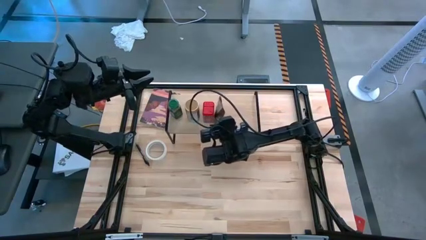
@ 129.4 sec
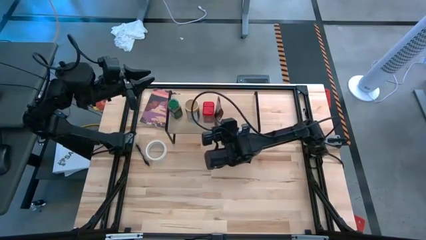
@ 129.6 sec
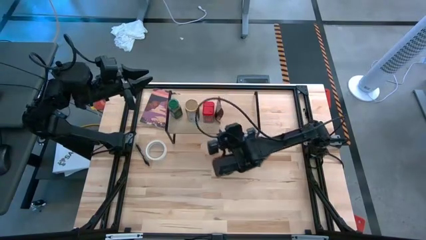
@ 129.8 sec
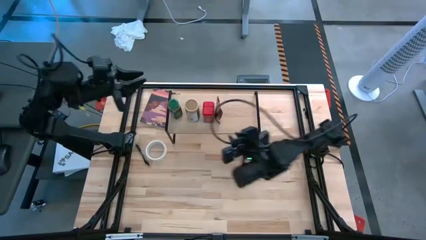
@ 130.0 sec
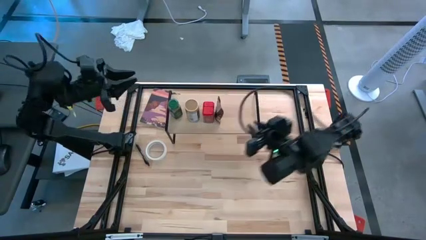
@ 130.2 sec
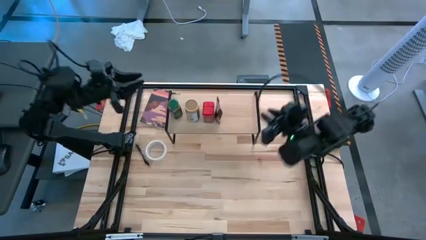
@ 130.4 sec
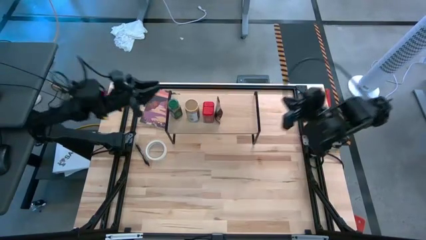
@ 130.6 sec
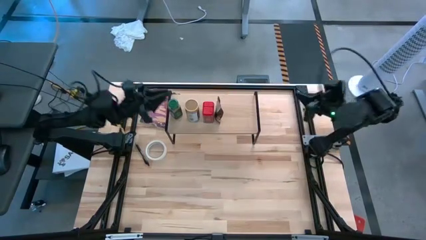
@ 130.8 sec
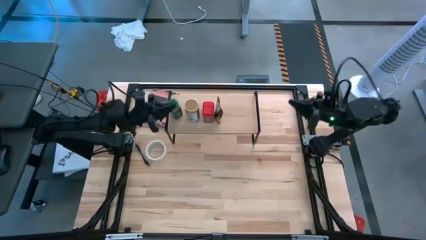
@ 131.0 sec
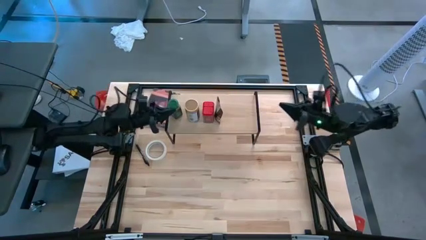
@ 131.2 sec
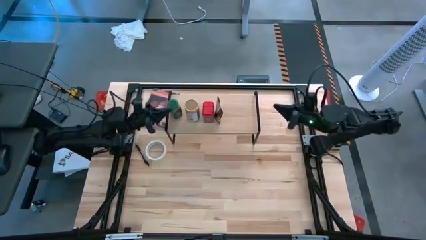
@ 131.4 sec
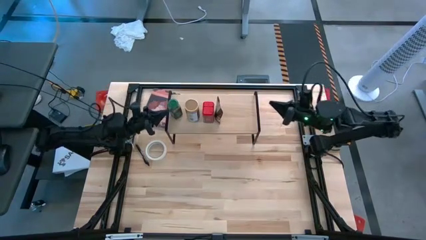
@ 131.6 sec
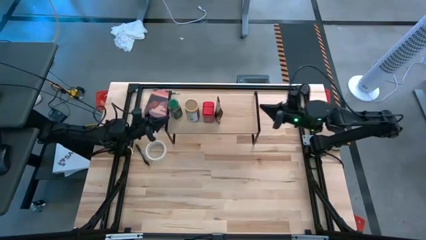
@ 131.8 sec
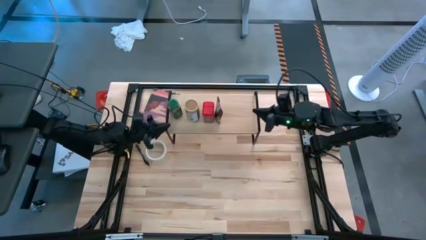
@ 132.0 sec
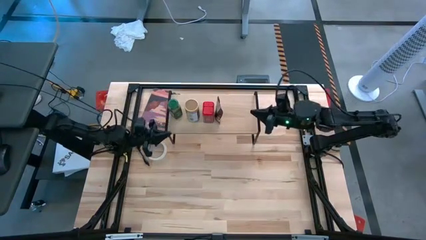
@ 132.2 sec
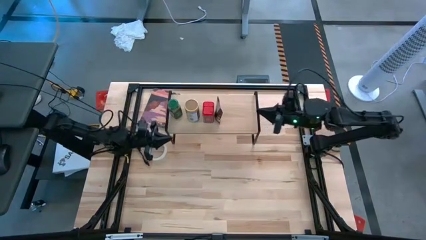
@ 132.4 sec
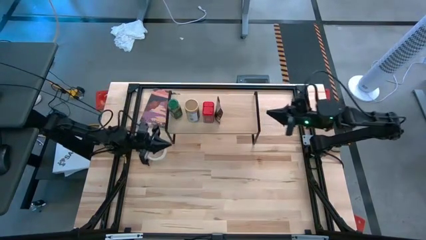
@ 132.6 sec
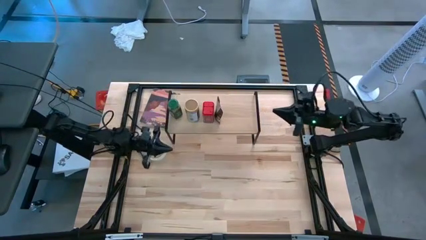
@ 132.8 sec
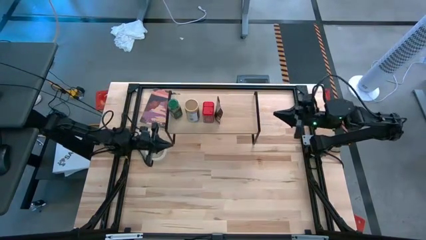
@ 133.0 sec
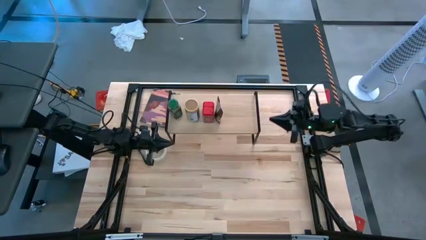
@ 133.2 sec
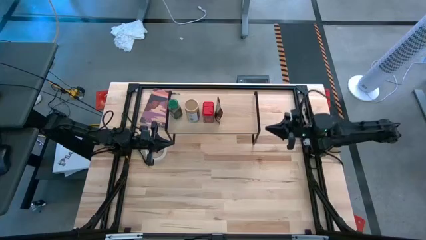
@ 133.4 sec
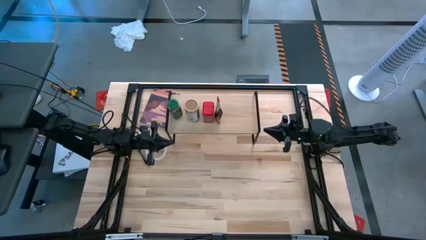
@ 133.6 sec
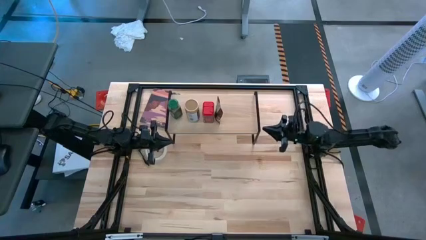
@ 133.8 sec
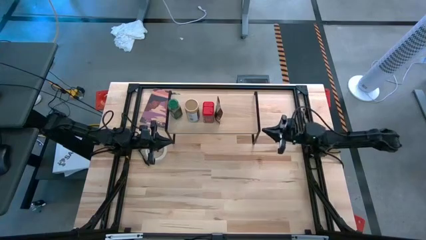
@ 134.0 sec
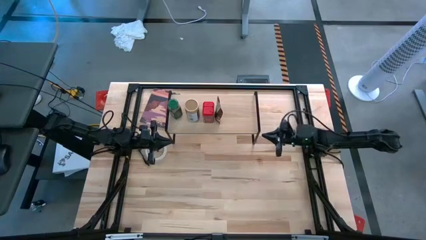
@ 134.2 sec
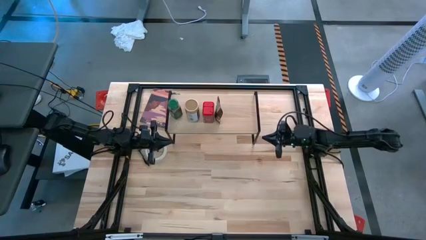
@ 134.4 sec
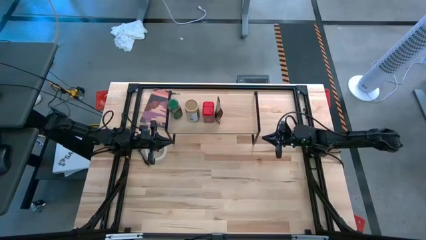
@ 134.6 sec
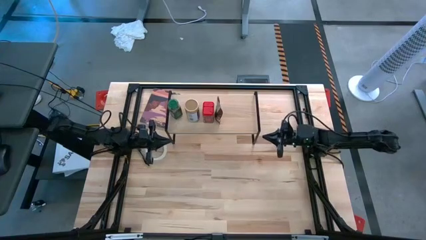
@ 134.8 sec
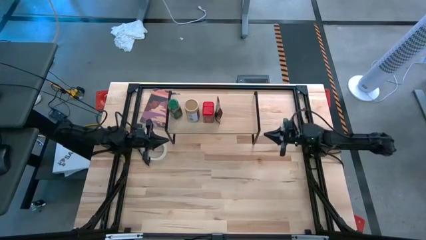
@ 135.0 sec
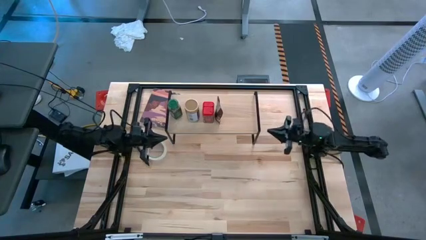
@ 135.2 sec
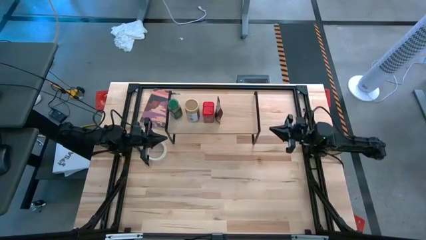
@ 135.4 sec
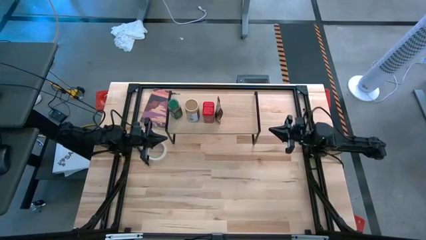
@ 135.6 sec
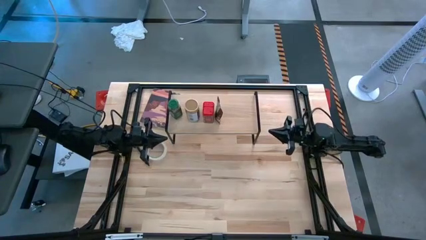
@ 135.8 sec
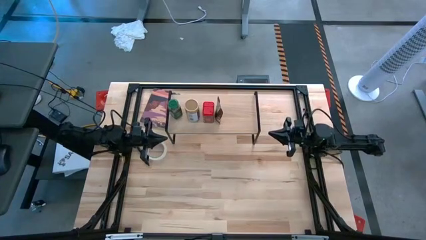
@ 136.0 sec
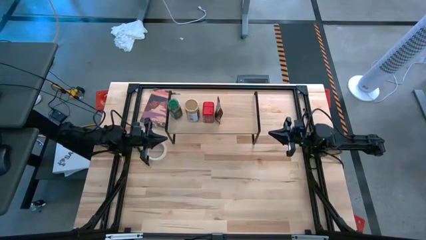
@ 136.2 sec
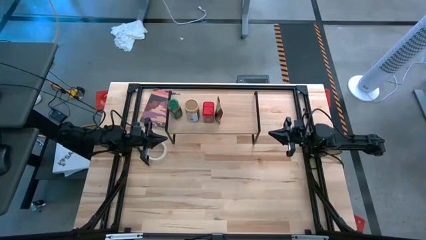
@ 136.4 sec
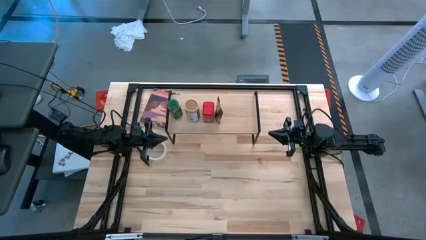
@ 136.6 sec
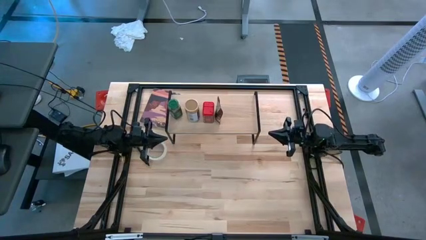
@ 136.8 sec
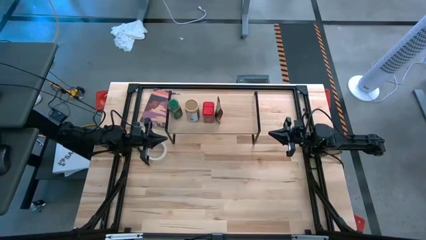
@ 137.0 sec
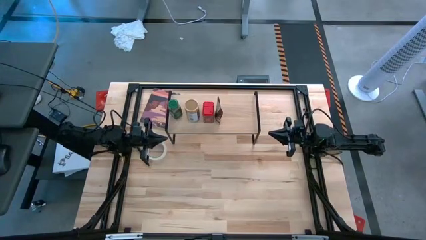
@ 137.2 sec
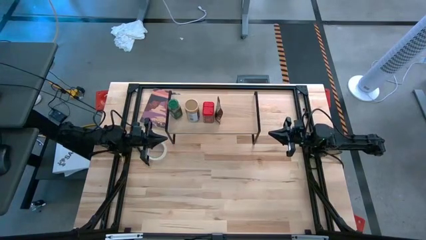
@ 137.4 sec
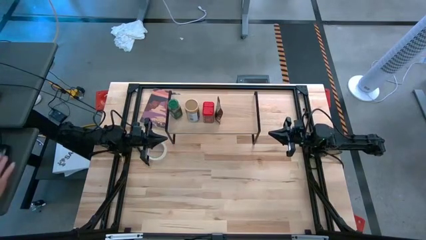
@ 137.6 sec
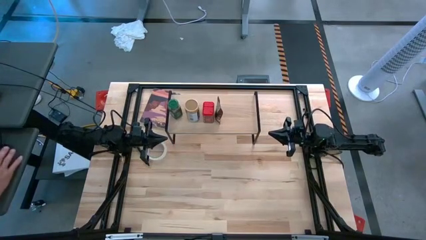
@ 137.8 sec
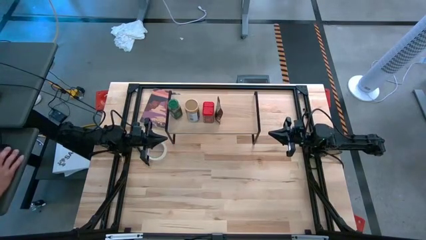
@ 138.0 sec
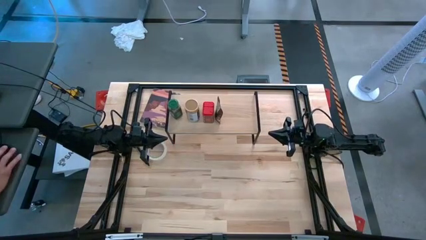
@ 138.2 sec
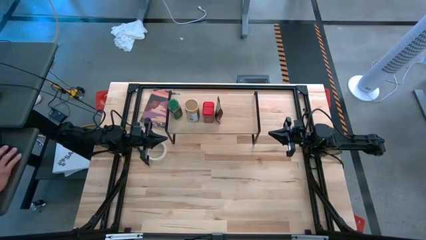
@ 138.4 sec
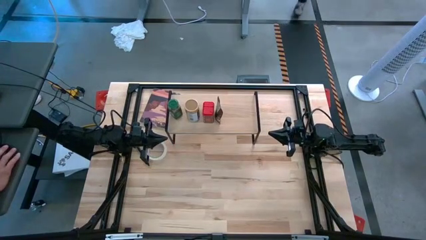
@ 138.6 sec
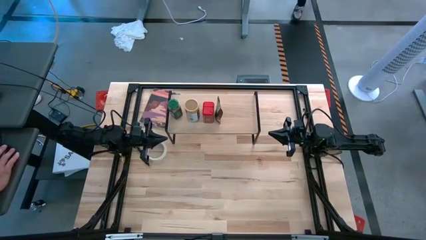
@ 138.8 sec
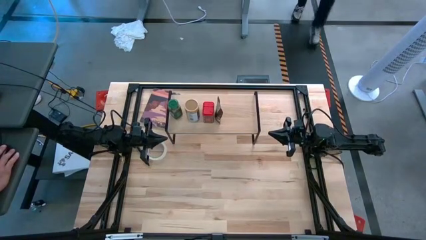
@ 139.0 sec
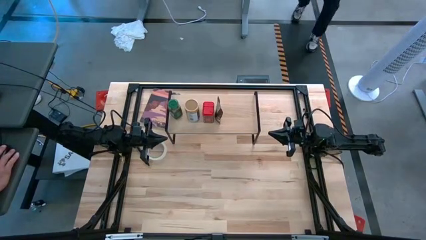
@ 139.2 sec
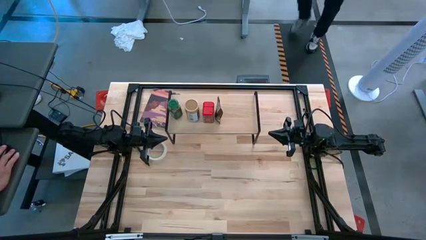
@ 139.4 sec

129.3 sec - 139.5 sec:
Task: Shelf spices
Return to Home Position

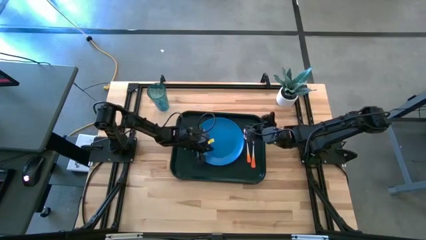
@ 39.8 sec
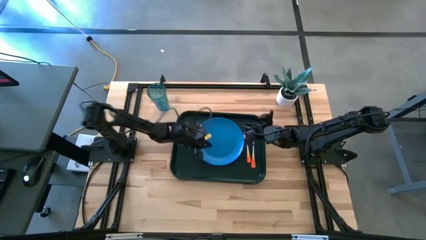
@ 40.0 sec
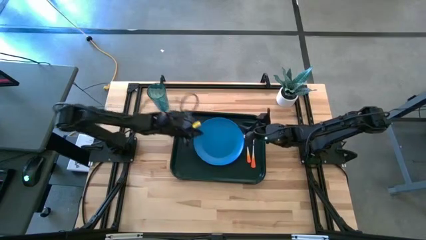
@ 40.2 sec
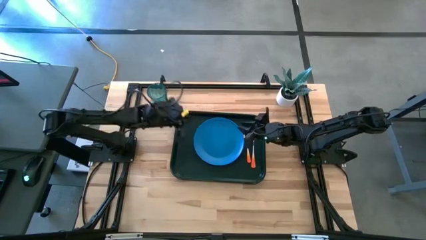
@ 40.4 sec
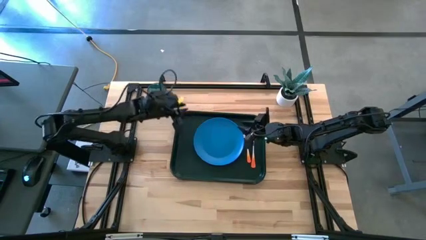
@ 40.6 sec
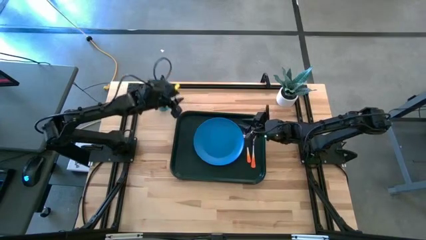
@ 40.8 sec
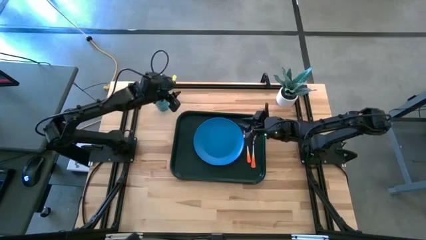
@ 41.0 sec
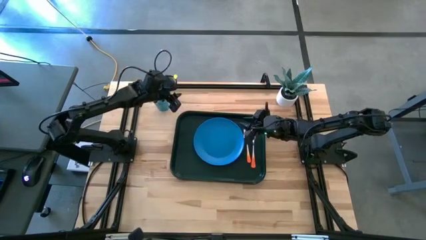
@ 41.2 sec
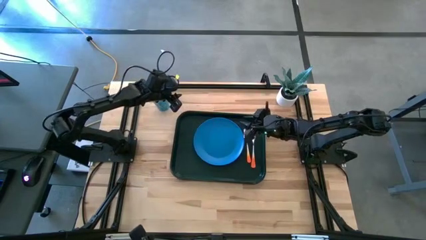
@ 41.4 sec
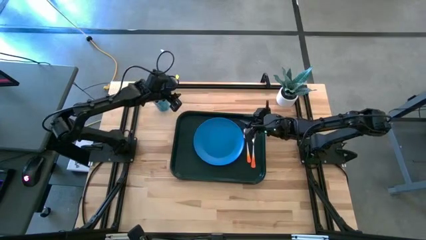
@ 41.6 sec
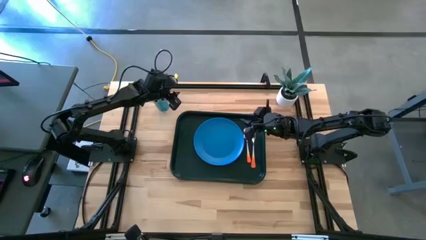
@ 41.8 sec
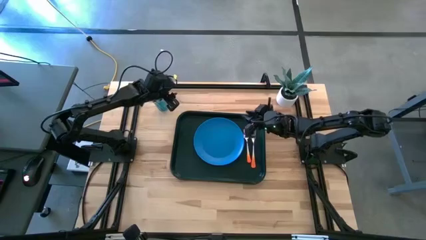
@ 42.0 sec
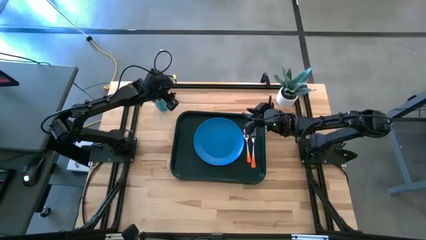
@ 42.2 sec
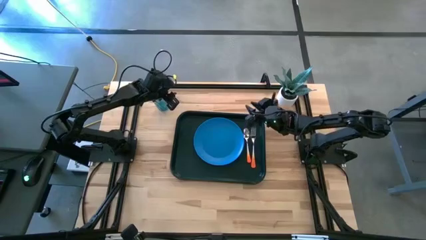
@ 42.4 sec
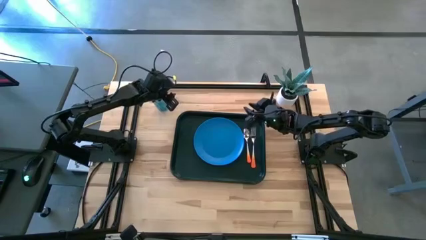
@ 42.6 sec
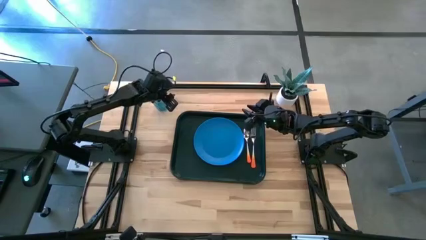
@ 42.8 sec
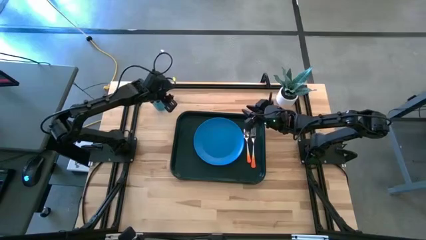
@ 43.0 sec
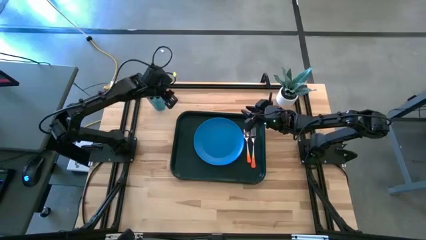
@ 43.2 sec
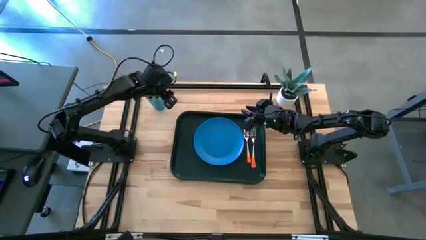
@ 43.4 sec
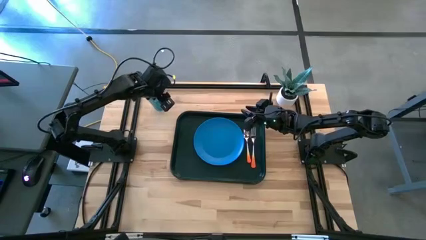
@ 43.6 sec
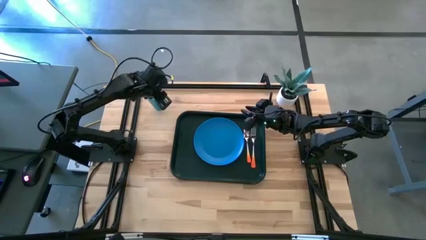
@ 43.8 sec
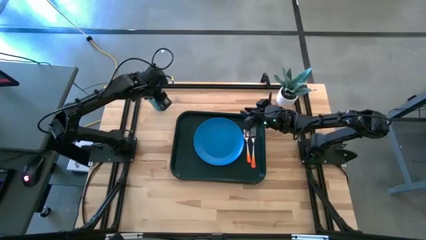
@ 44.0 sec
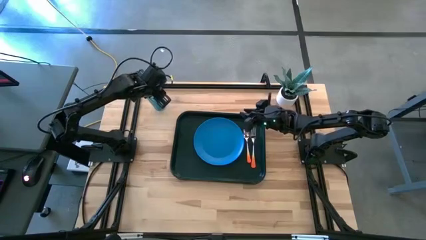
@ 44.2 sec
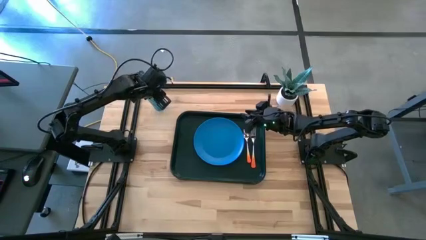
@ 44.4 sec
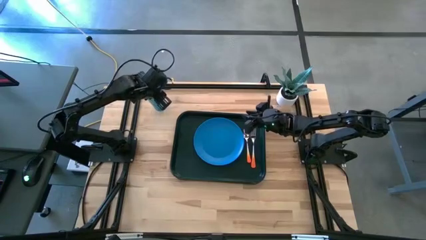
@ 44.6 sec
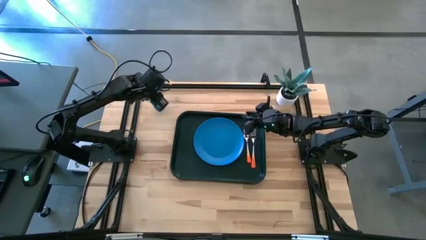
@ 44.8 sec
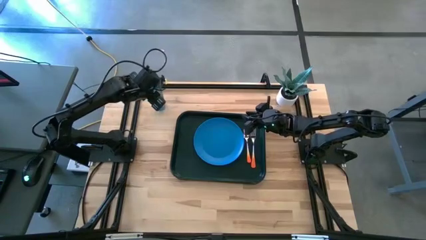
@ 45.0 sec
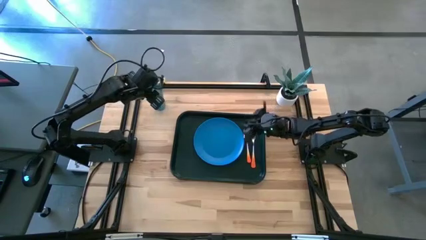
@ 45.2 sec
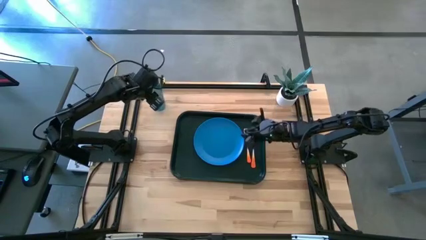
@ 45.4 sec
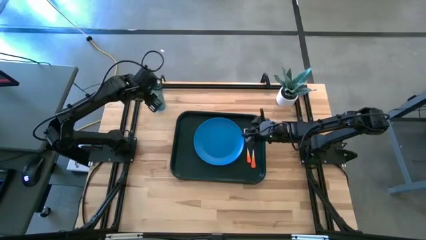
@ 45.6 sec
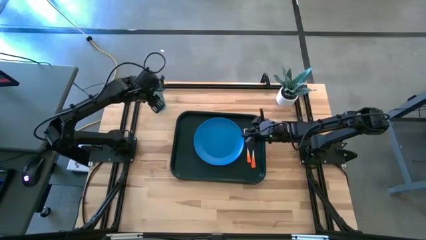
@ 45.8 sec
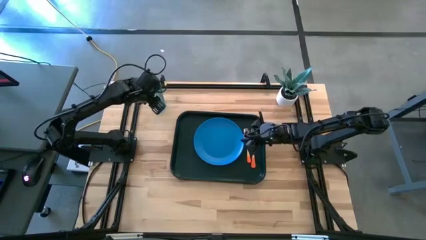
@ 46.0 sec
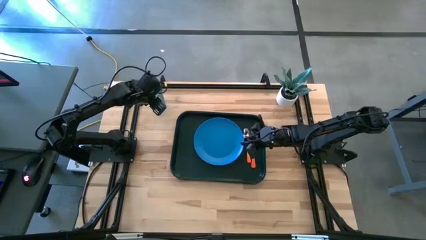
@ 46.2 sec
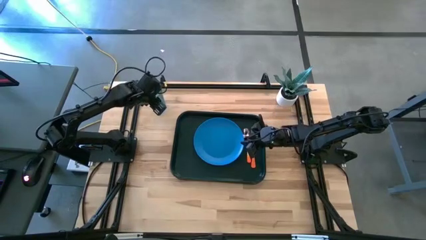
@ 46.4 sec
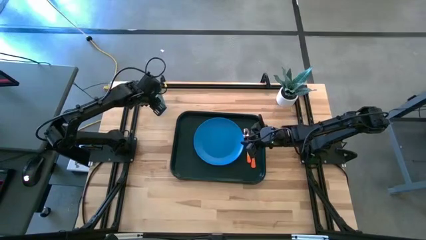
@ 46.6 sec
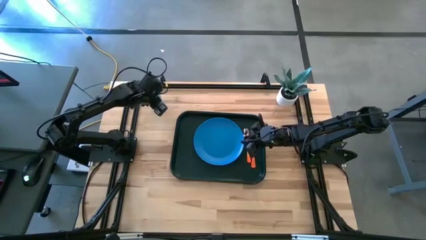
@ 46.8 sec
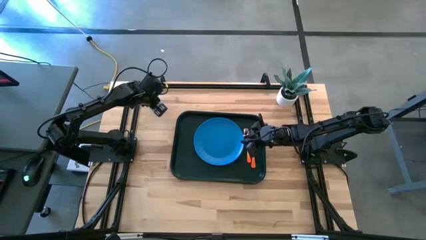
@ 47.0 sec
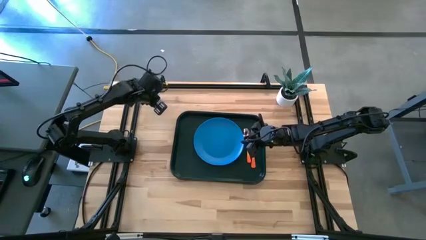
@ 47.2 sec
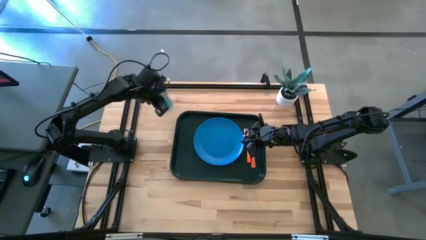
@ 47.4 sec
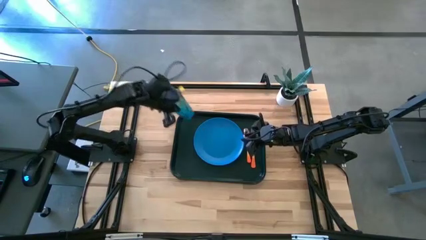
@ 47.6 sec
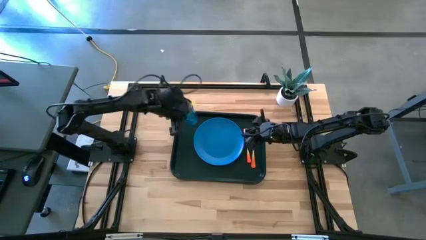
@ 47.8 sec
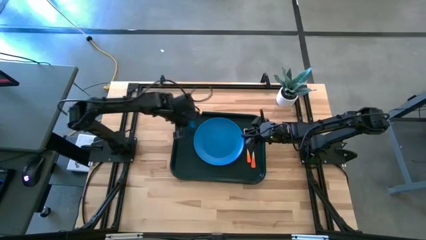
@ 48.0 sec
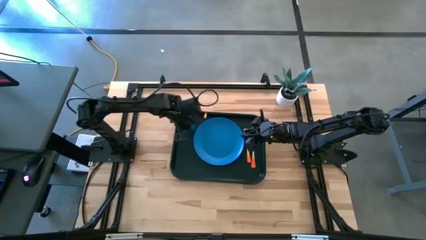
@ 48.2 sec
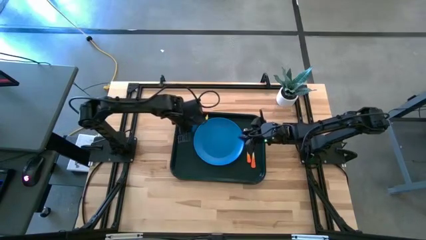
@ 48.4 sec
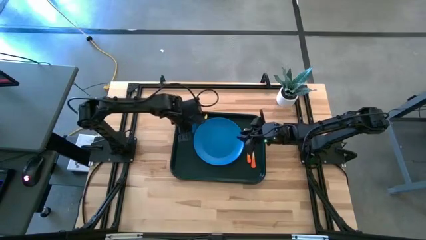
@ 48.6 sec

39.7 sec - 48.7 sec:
Task: Pick and place plate/cup/fork/spoon on tray
Put the blue cup on the serving tray to the top left of the blue plate
